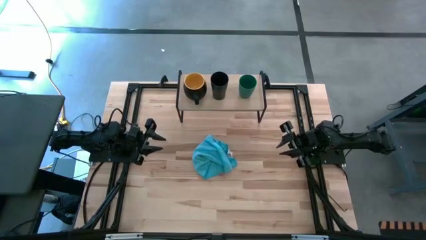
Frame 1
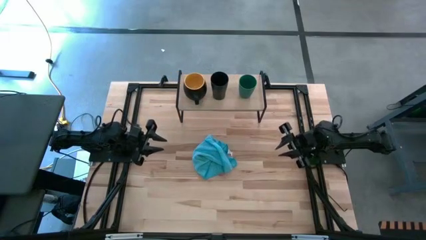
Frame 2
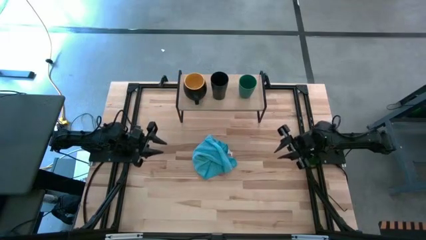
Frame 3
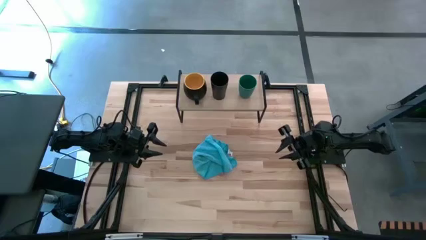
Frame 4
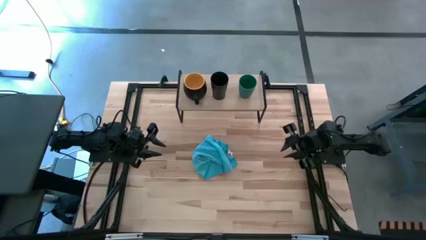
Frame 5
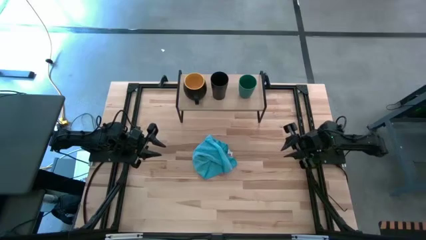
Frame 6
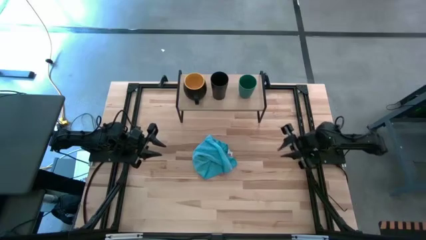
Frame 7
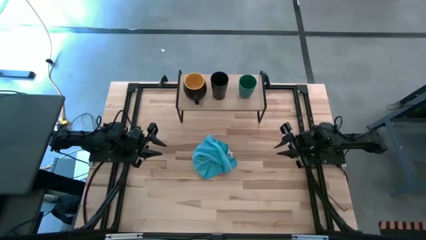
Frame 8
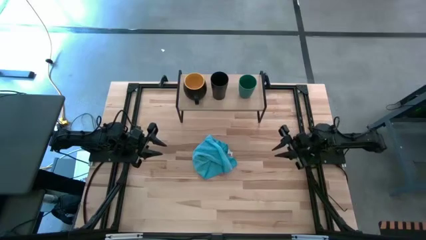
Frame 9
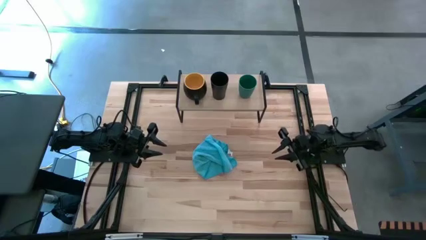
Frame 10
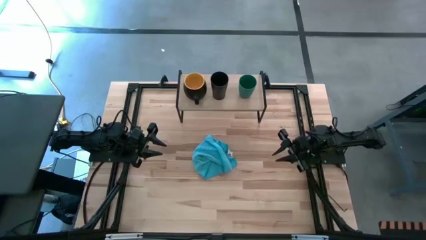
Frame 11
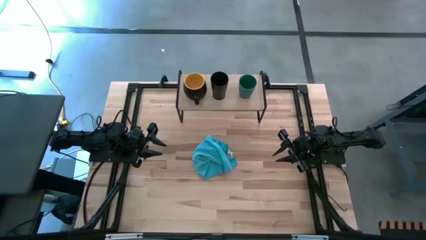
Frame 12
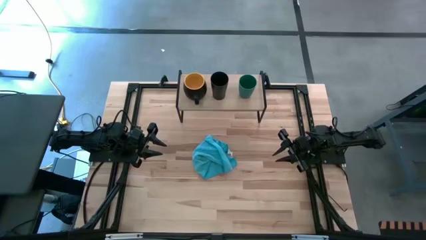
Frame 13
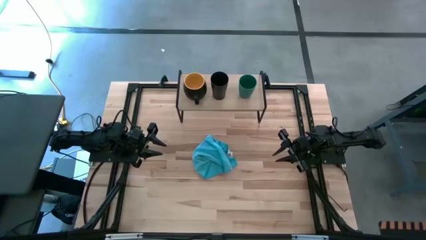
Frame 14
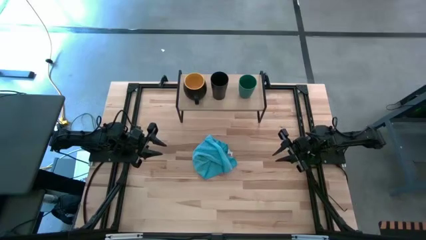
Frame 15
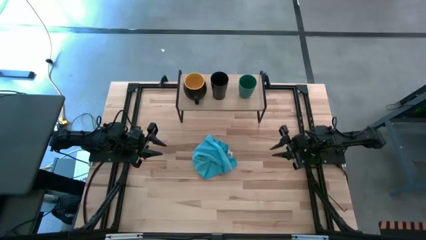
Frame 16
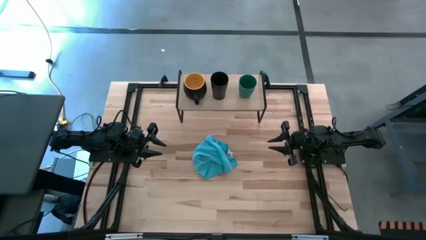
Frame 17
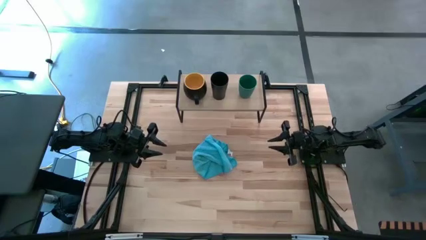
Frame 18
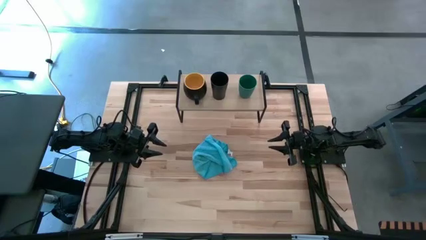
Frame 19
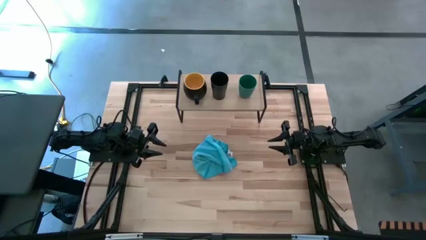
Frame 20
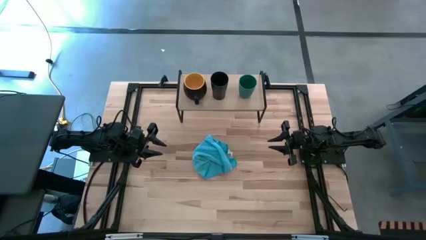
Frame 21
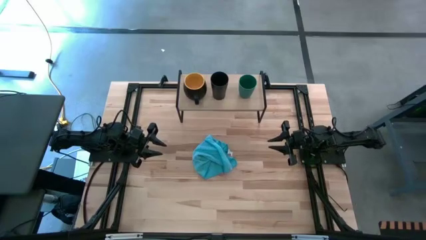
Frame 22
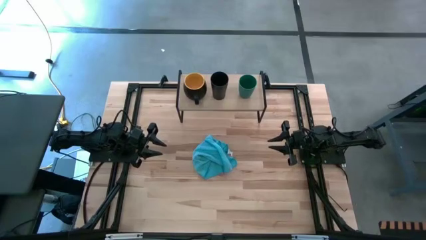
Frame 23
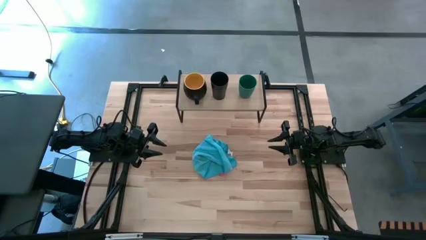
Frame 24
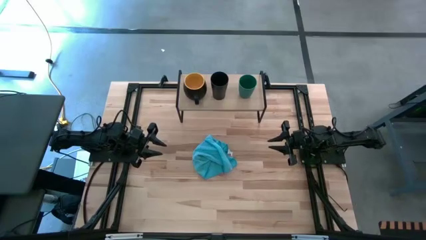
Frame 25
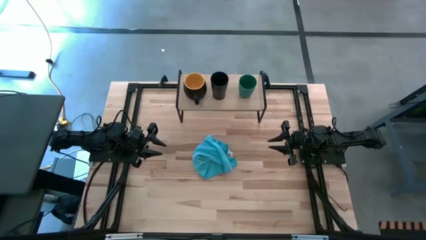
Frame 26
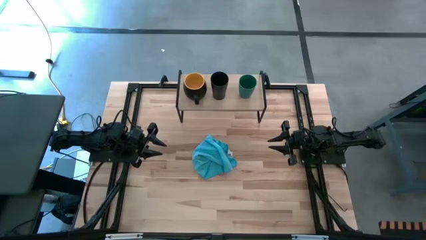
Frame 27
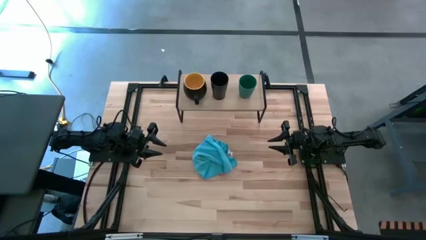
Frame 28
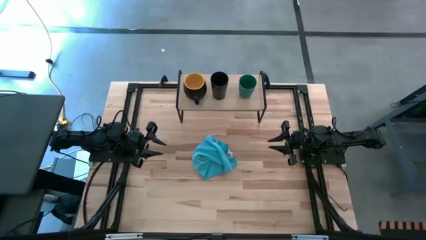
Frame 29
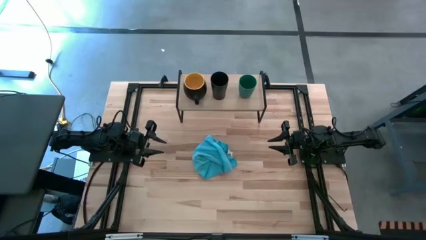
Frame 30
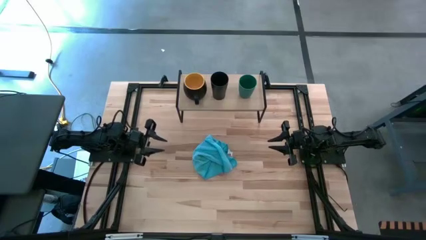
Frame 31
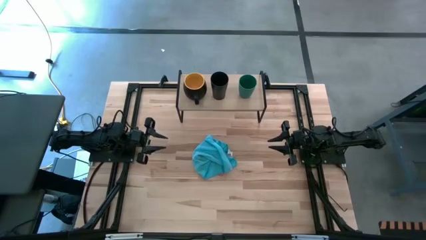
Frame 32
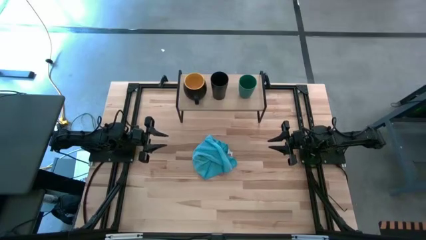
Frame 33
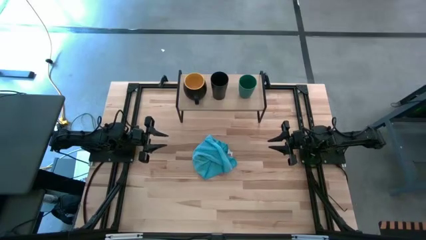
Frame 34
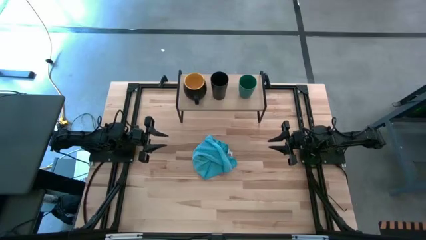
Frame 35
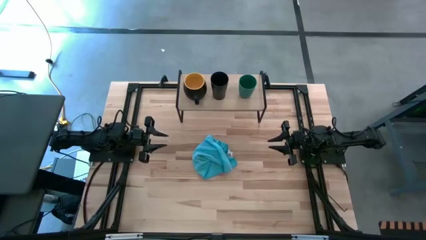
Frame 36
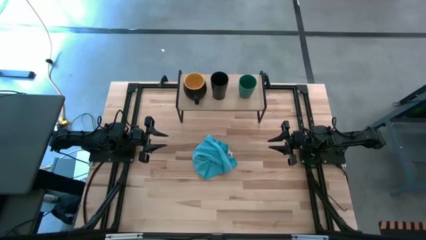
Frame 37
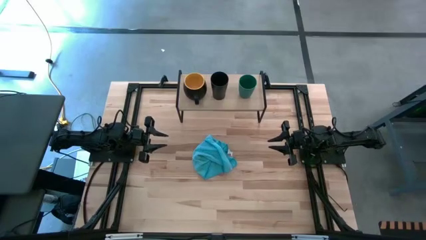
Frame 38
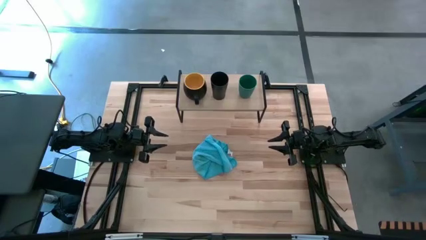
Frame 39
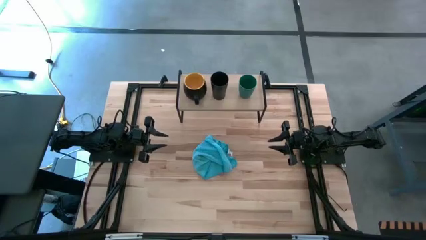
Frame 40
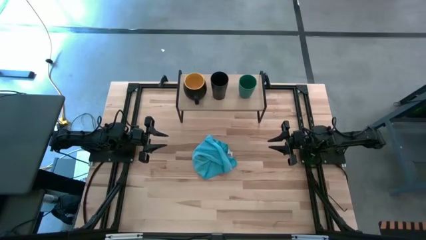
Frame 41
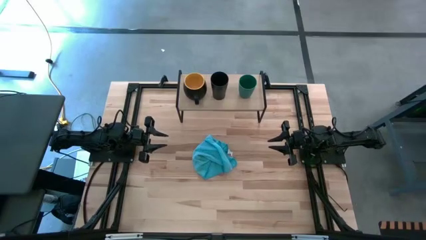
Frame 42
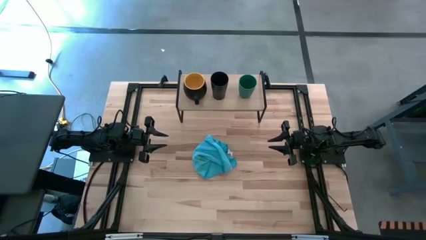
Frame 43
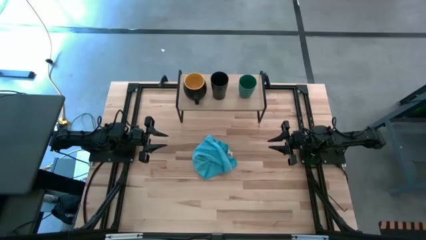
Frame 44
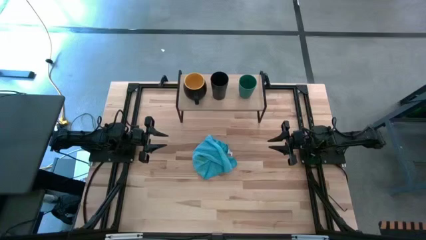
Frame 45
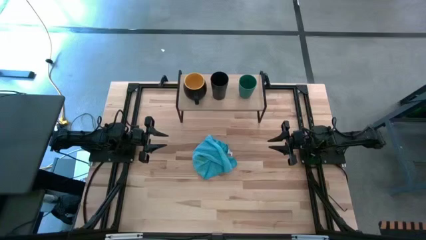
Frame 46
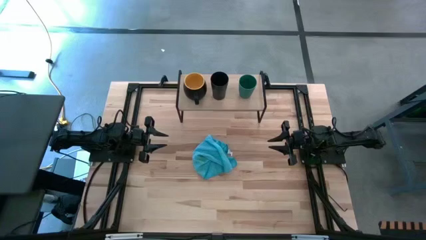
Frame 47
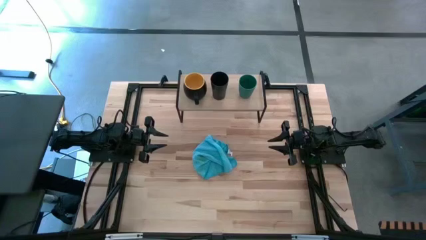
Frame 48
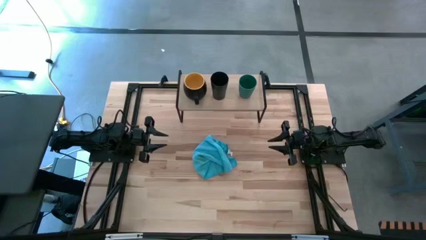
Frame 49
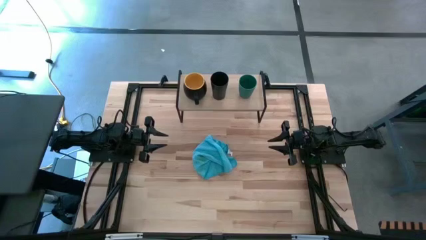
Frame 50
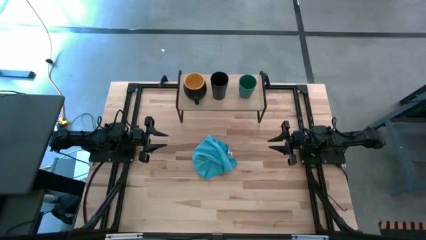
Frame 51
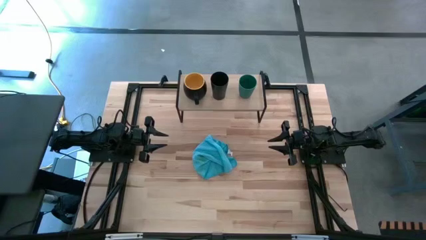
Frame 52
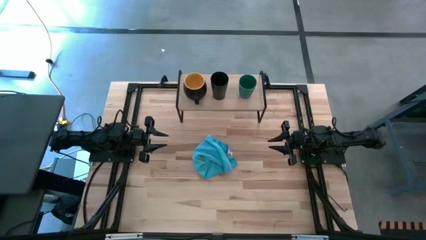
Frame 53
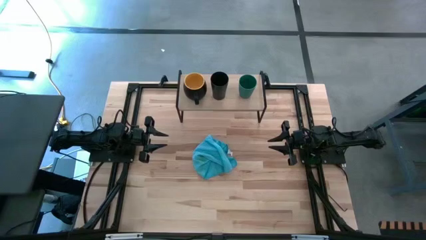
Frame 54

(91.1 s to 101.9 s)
Task: Stack small to large cups/mugs on shelf
Return to Home Position

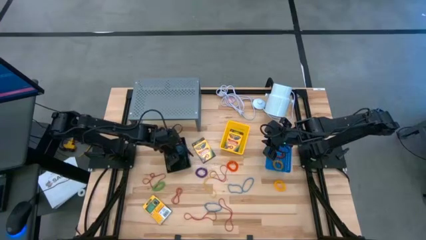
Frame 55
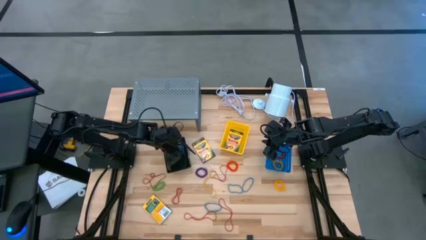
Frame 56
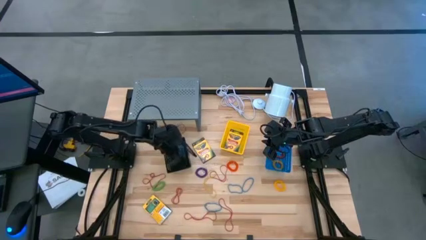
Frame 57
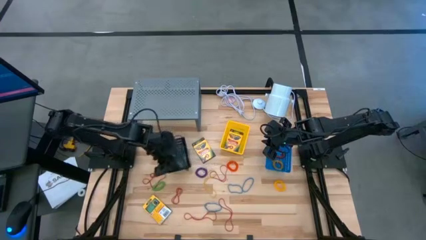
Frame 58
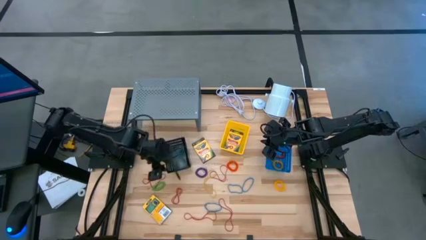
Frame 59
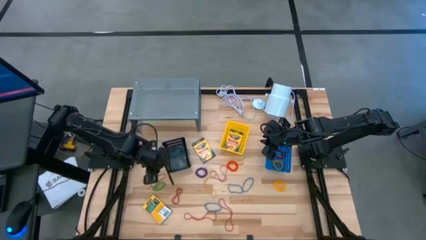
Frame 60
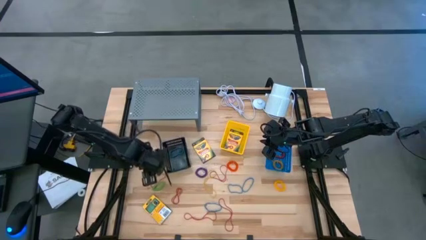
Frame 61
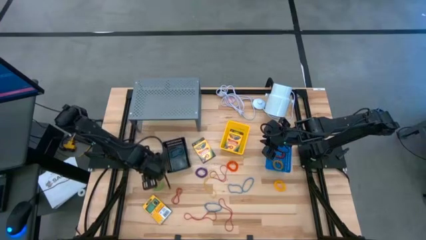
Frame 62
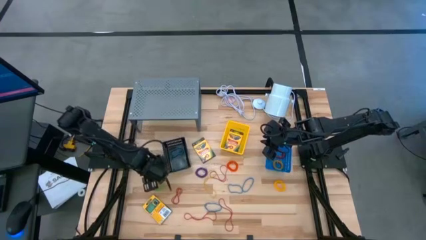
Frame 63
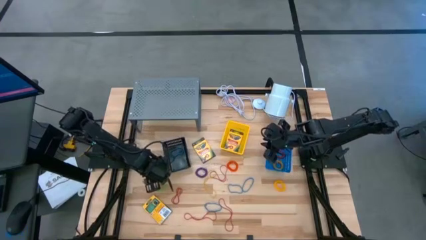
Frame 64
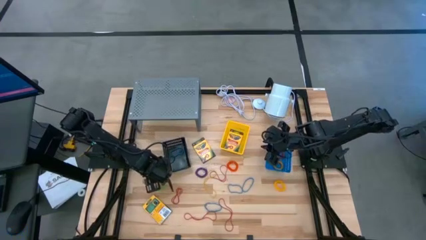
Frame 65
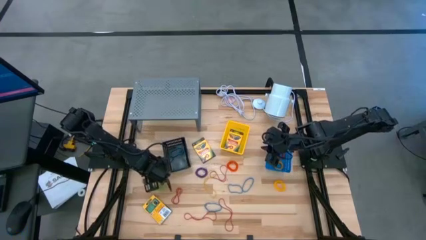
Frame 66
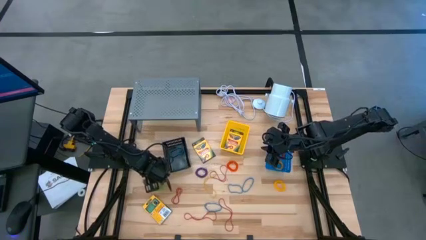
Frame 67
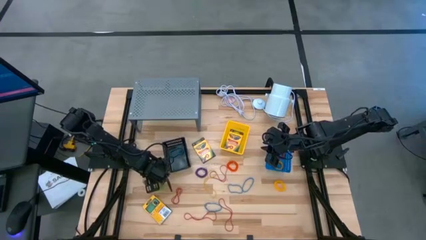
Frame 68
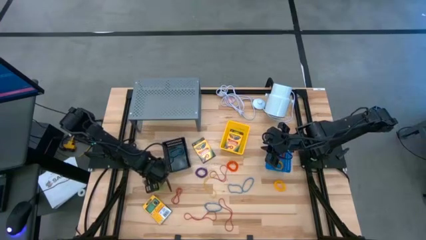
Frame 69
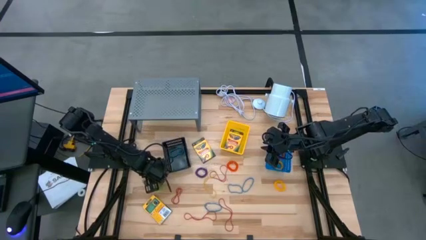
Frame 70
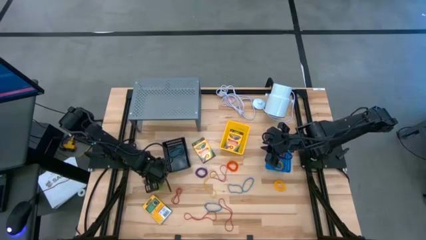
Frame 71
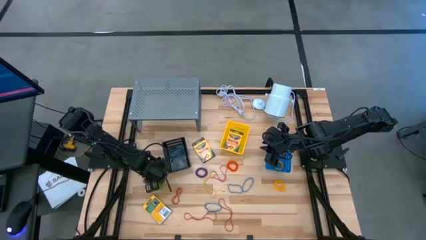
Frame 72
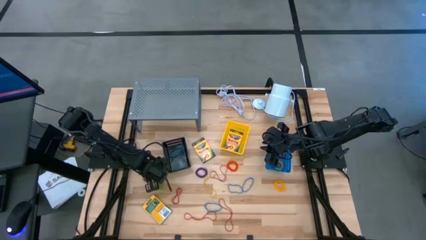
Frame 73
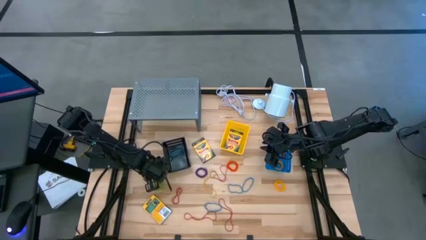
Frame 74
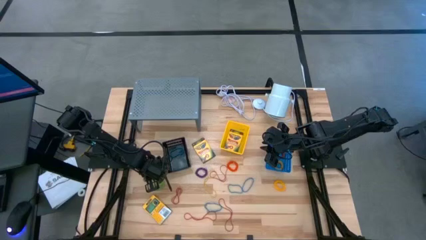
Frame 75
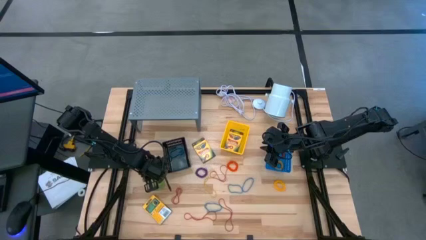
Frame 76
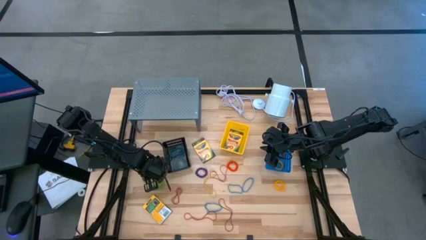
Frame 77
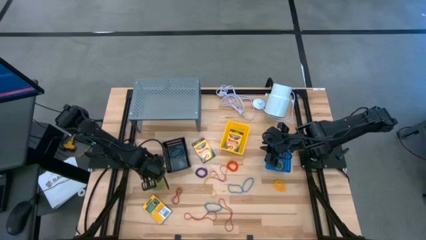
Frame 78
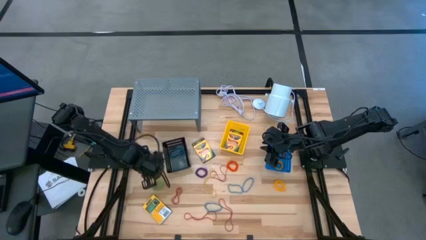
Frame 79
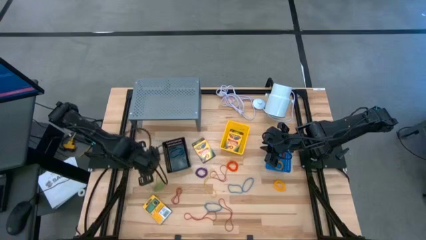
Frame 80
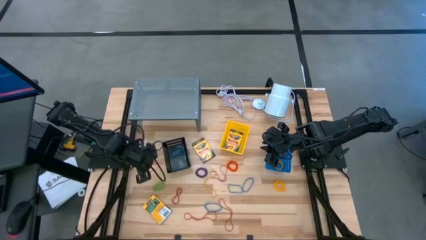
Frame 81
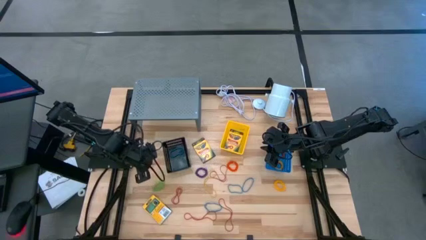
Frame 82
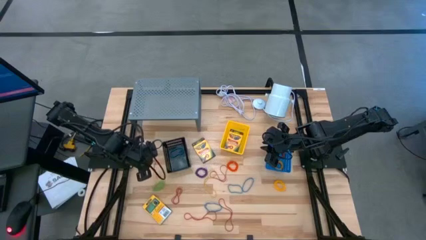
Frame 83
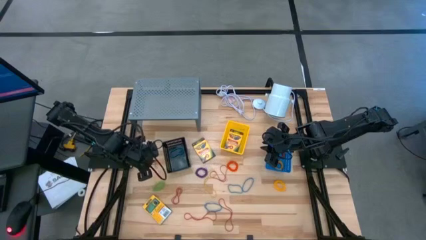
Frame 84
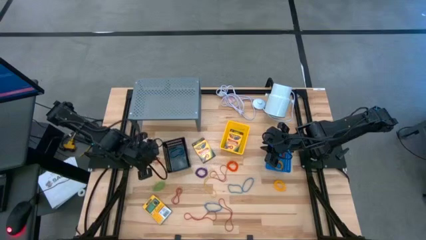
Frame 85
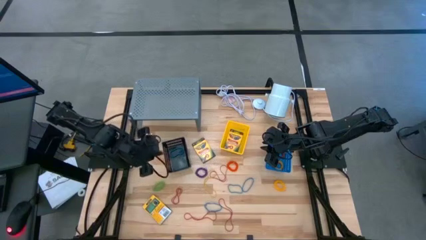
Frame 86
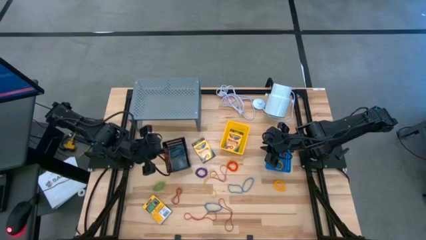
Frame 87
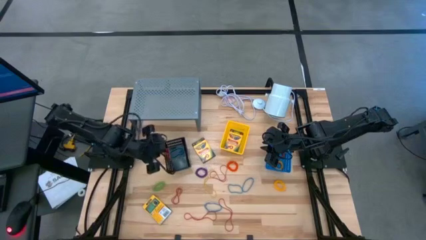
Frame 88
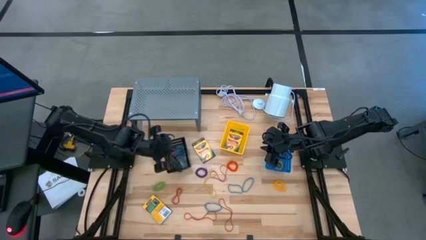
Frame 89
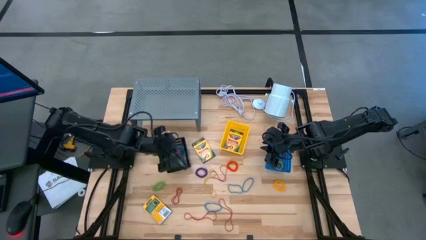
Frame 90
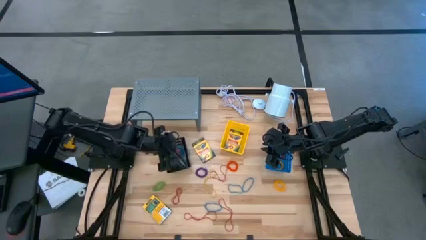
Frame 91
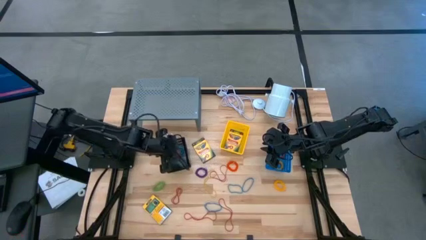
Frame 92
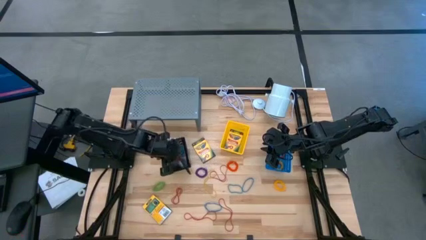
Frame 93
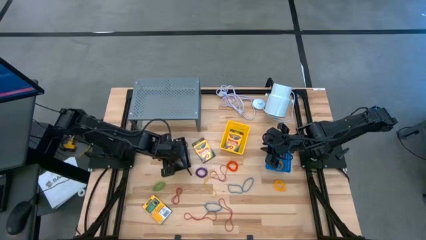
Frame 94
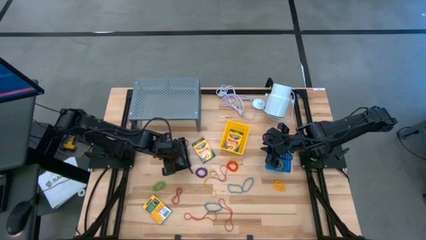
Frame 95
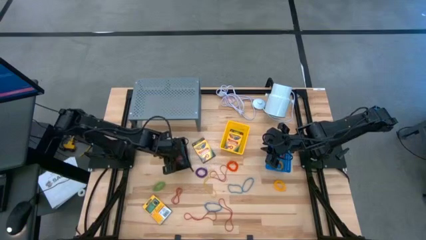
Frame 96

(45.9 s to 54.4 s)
Task: Pick & Place Office Desk Supplies
Put the red rubber band into the black bin
